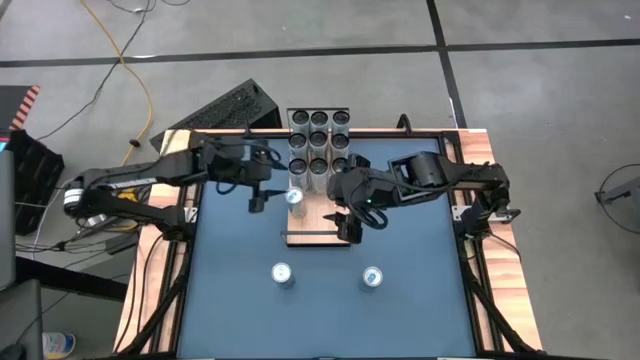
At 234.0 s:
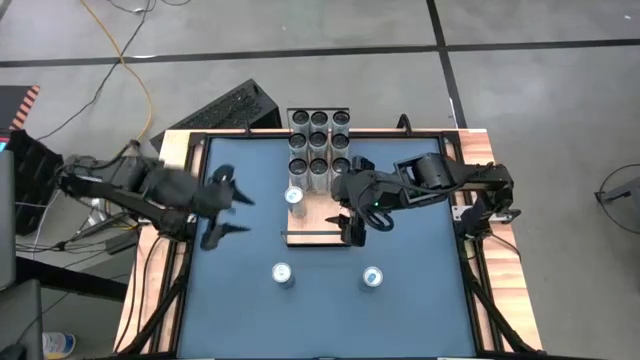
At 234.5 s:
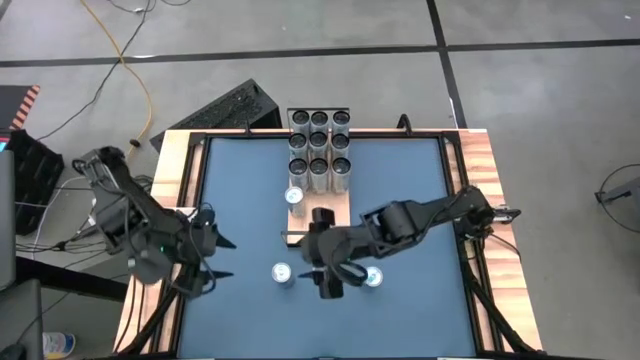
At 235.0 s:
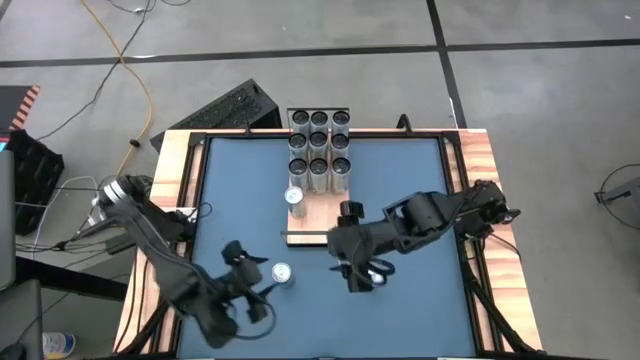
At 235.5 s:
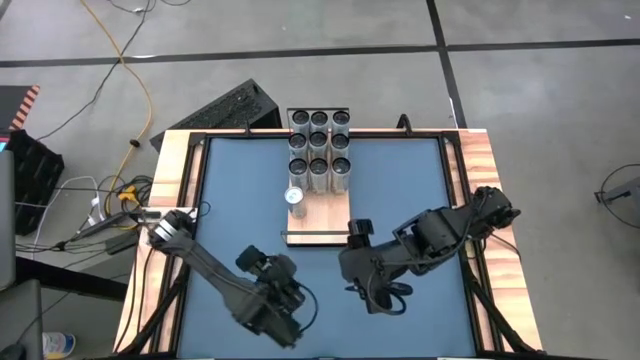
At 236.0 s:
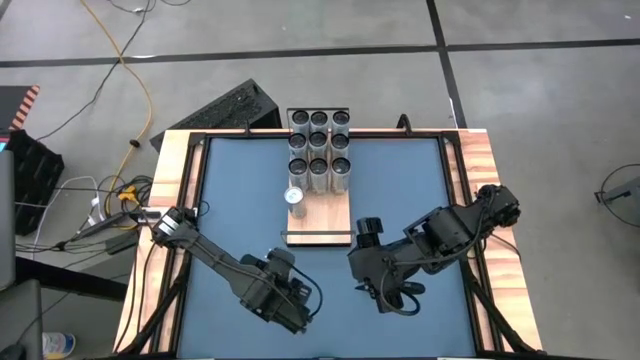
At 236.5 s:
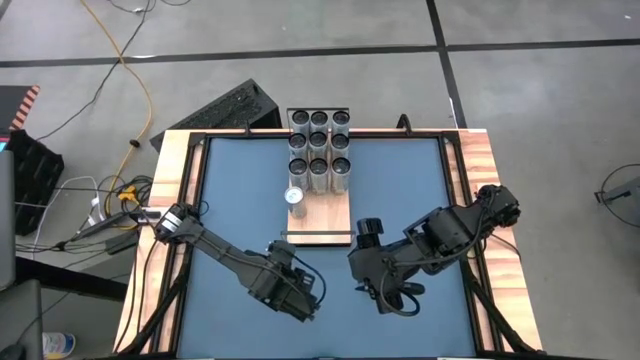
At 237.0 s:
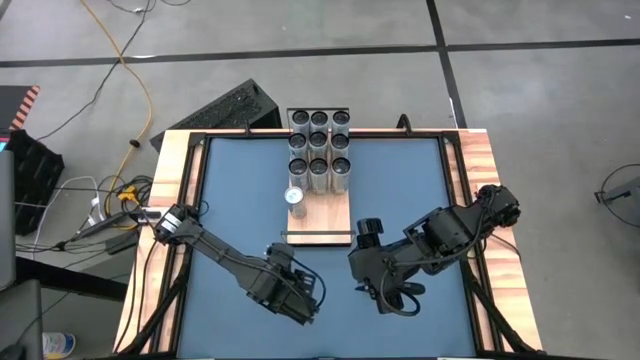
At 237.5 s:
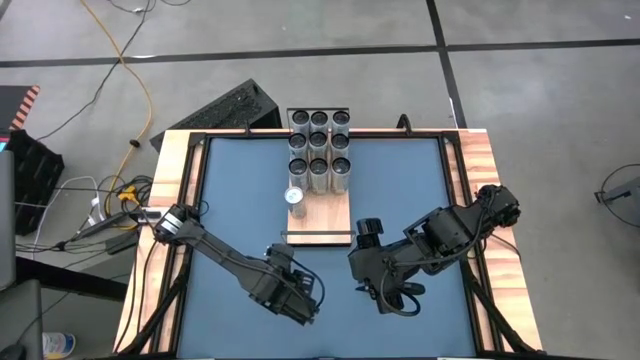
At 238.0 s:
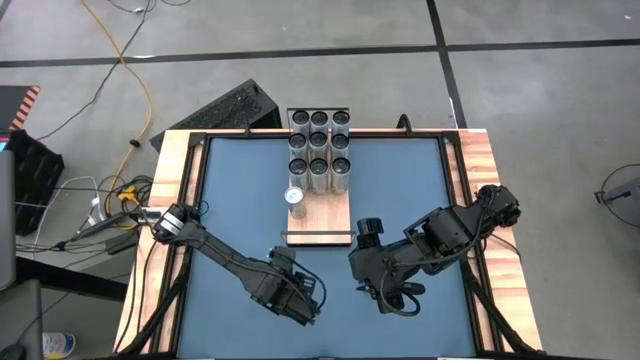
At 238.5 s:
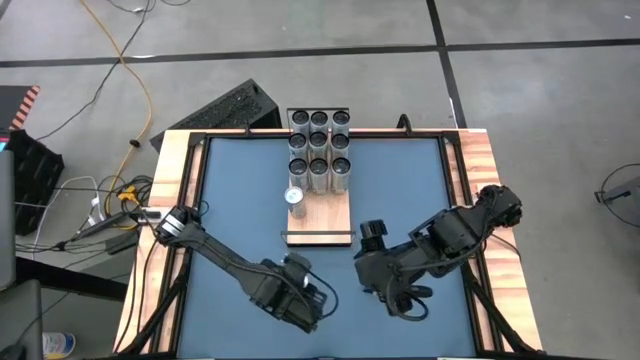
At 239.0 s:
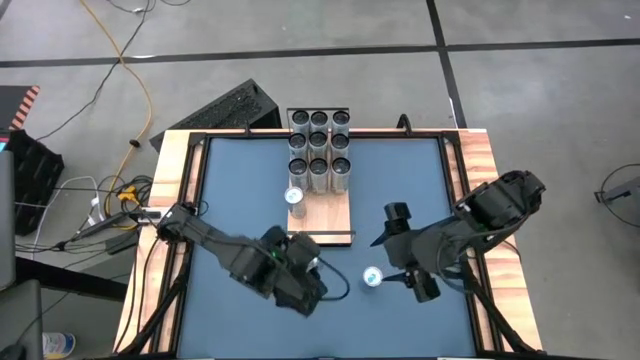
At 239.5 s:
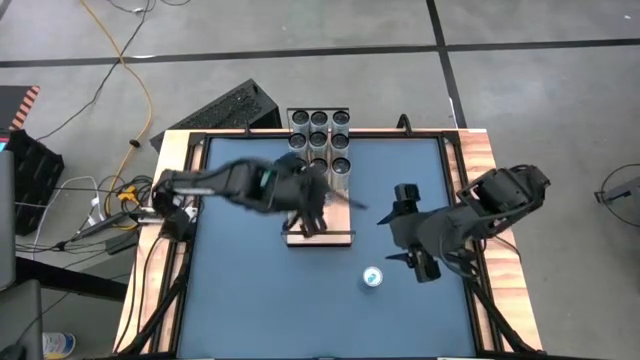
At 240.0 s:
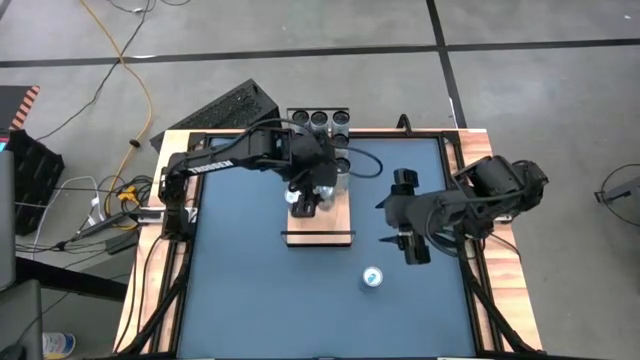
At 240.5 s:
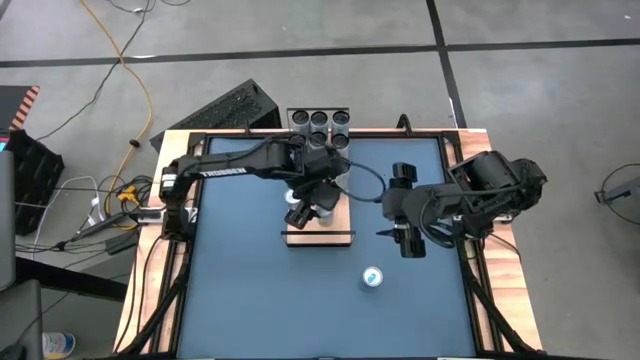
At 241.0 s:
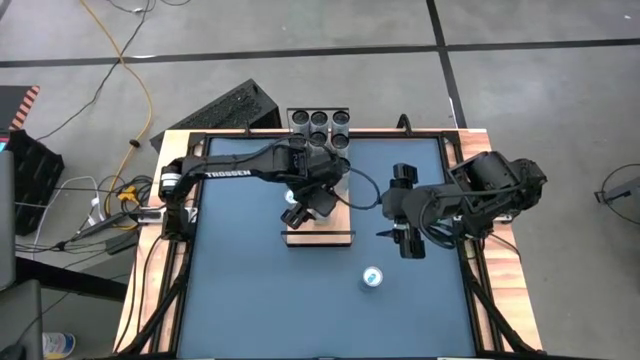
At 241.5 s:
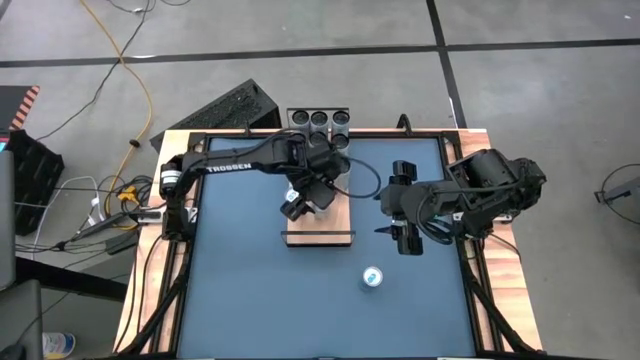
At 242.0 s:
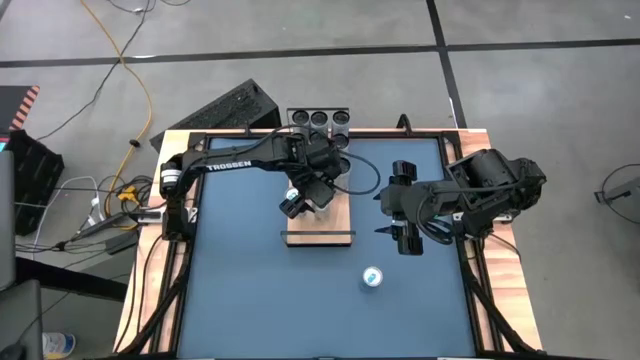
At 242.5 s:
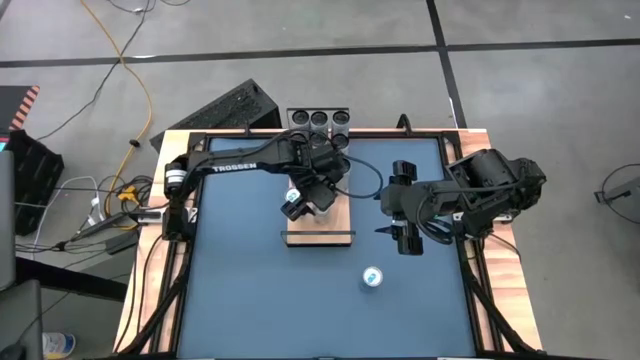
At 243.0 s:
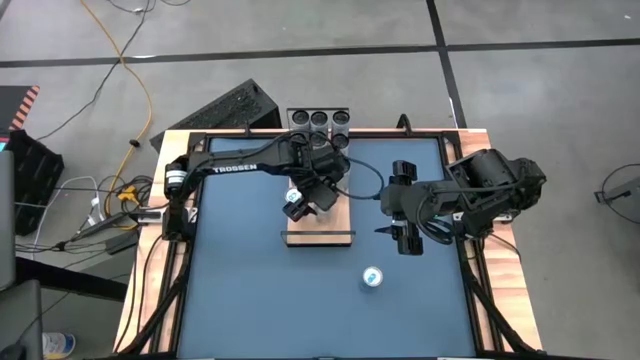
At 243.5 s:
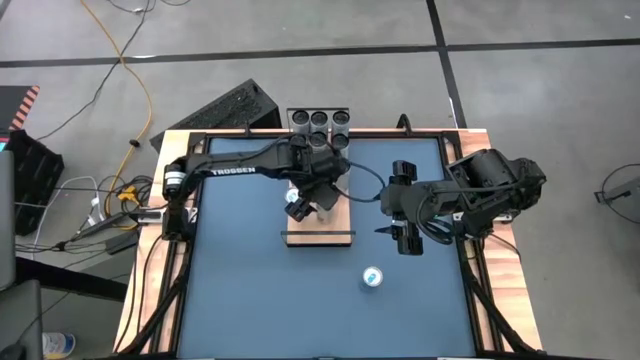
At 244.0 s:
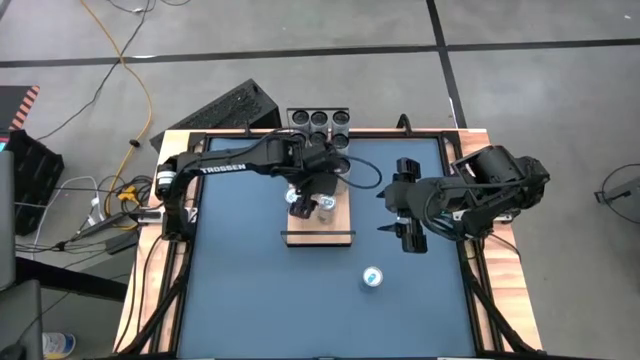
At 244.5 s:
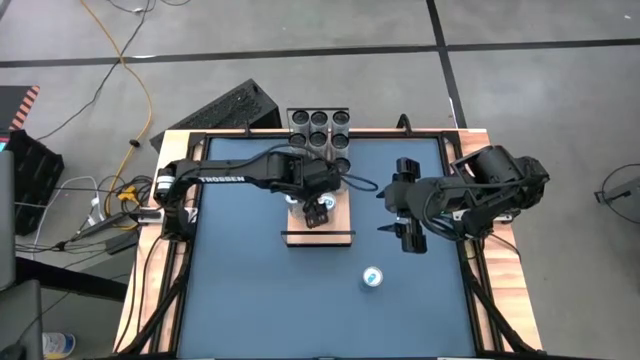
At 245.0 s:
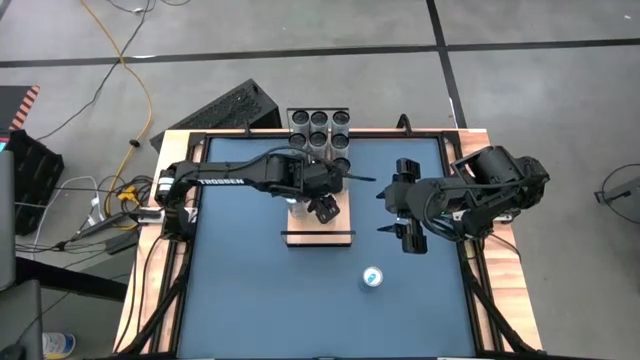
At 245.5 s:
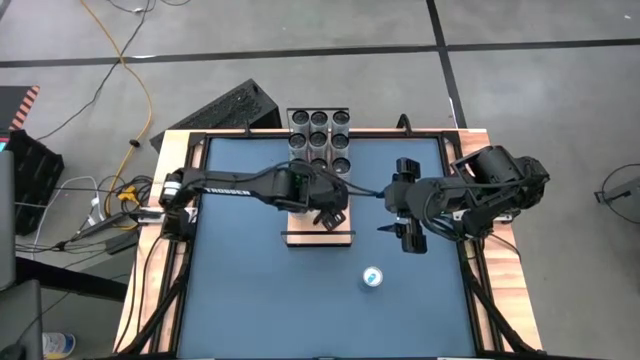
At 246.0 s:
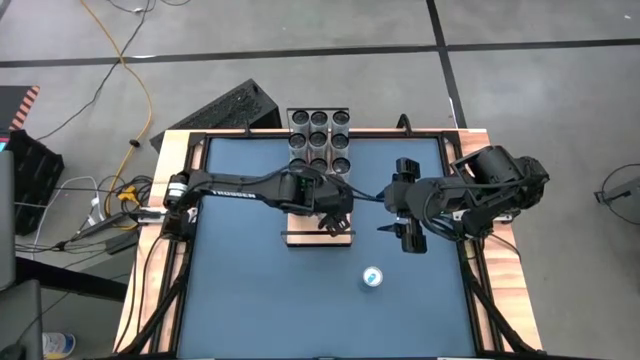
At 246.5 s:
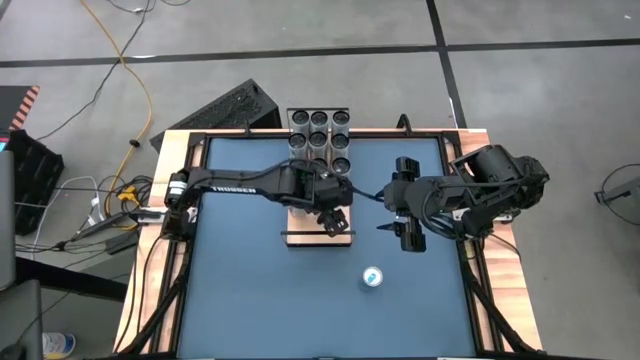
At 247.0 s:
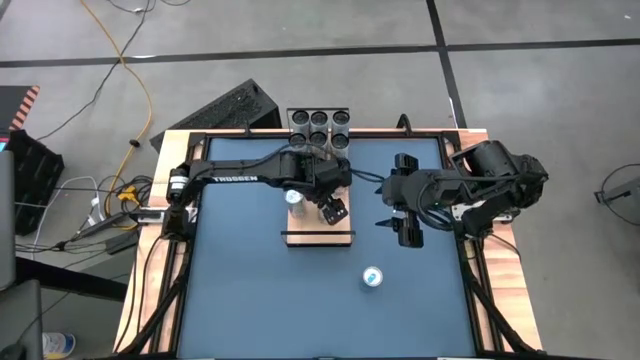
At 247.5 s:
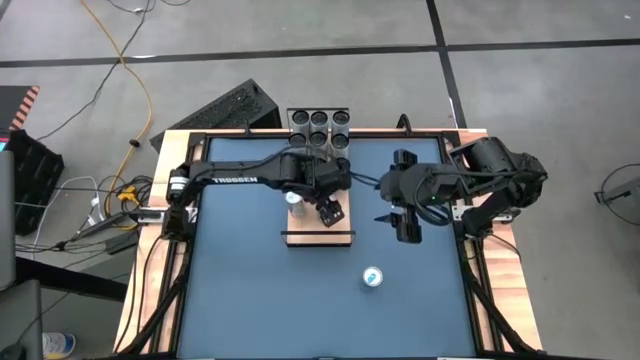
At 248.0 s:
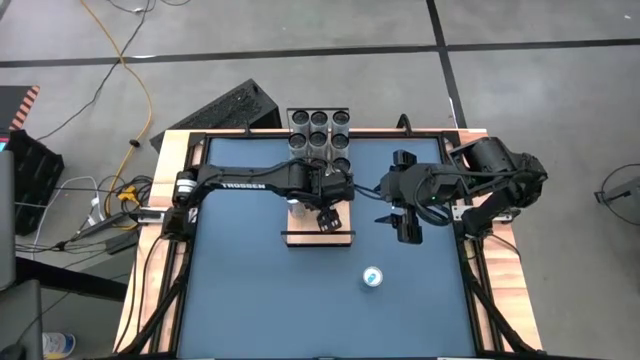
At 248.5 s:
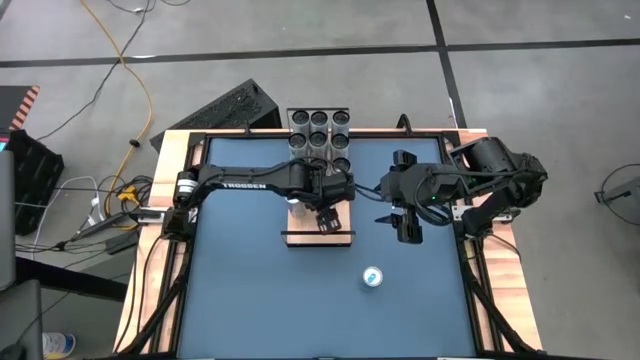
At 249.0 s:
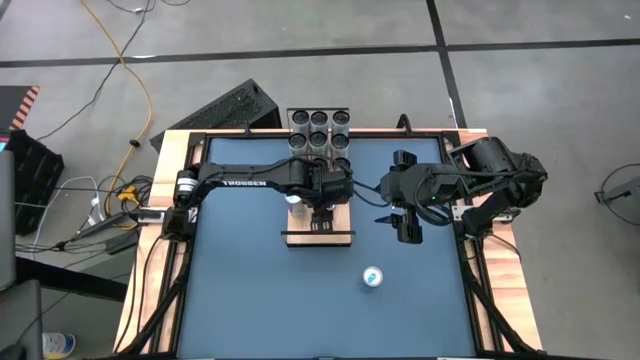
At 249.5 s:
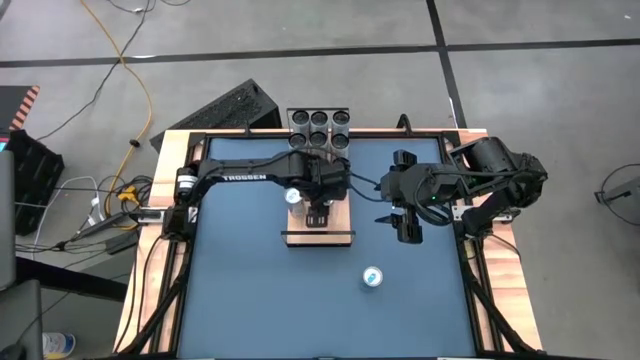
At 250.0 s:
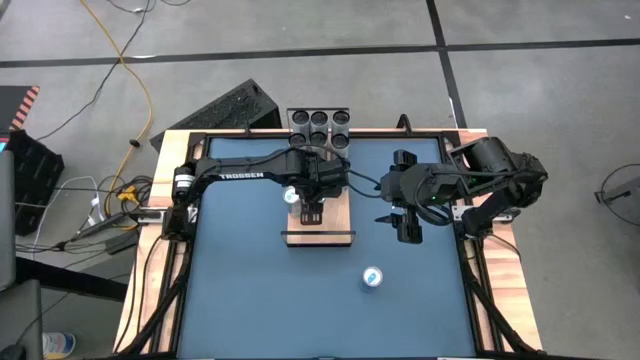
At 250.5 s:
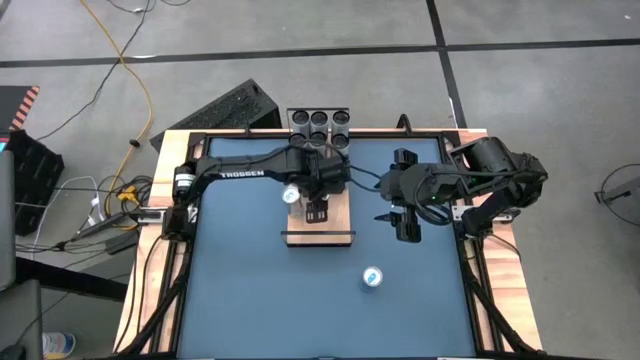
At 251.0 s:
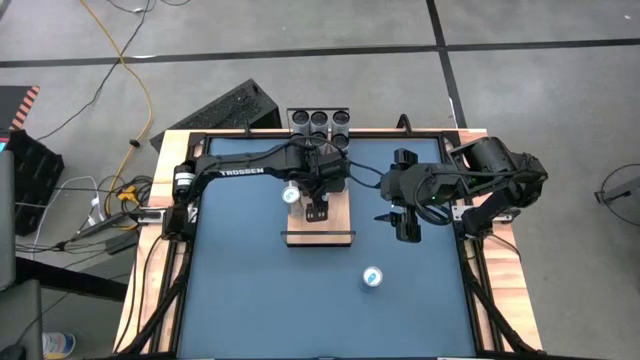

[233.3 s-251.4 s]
Task: Place canned beverage on shelf
Put the left blue soda can on the shelf

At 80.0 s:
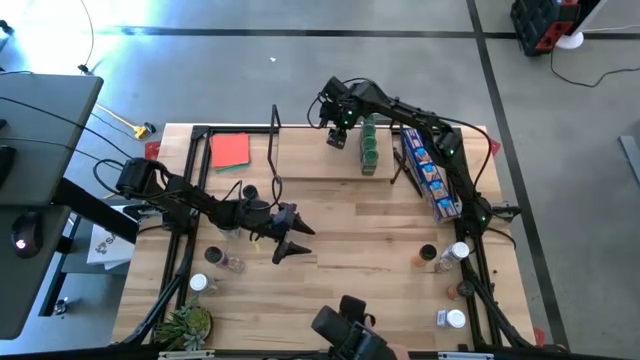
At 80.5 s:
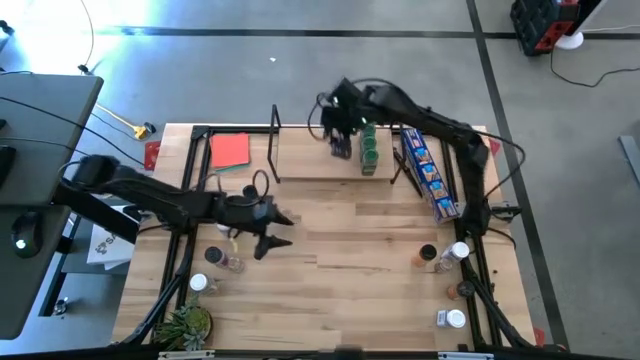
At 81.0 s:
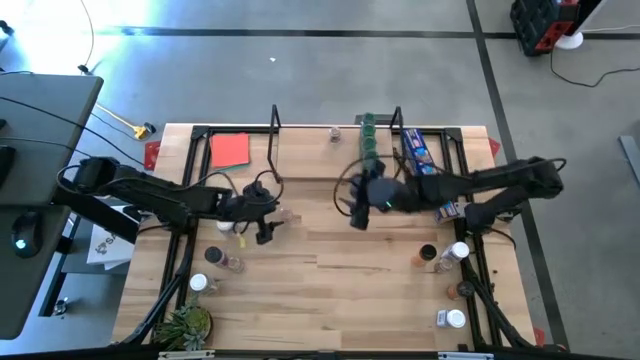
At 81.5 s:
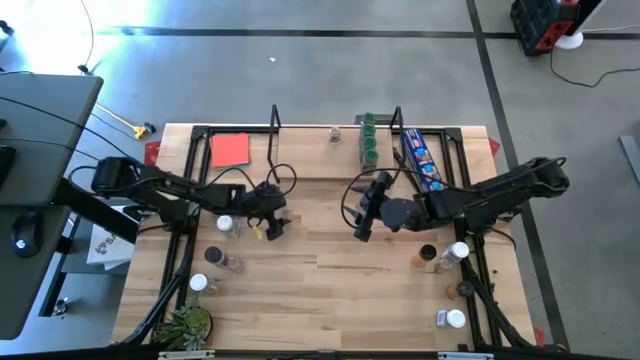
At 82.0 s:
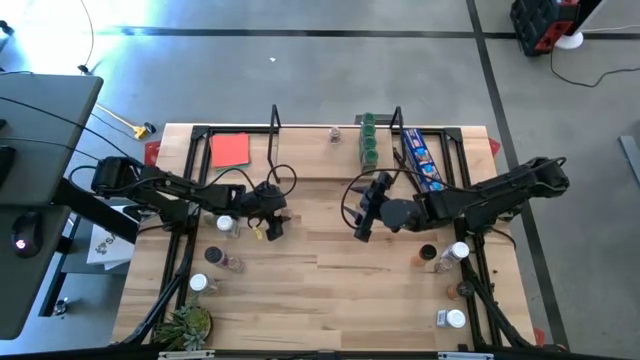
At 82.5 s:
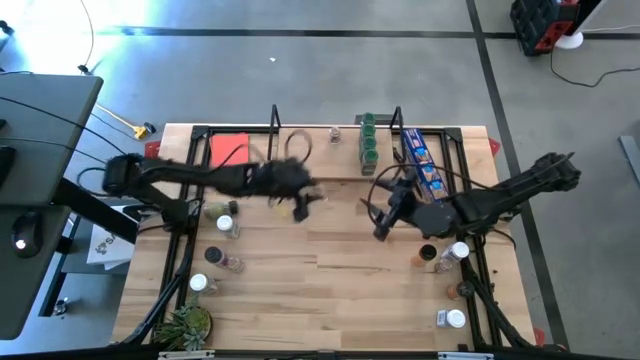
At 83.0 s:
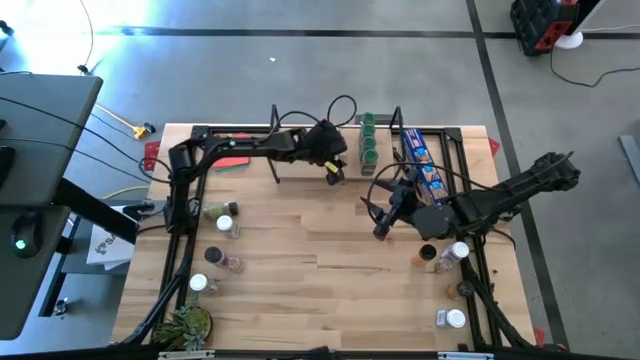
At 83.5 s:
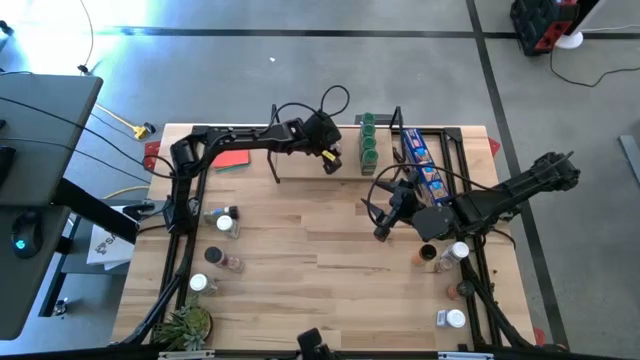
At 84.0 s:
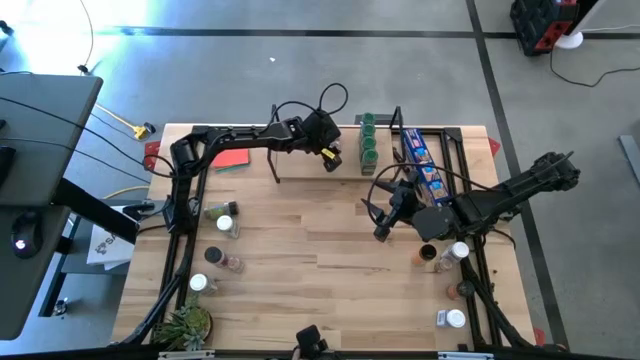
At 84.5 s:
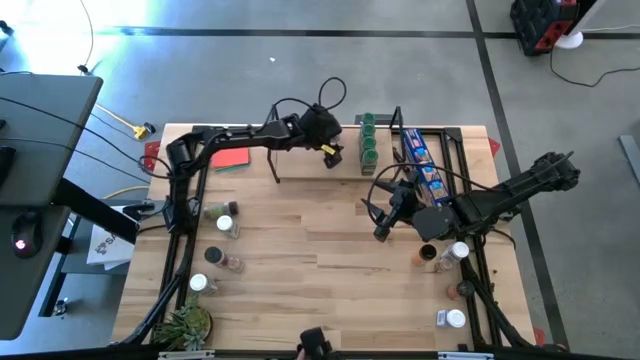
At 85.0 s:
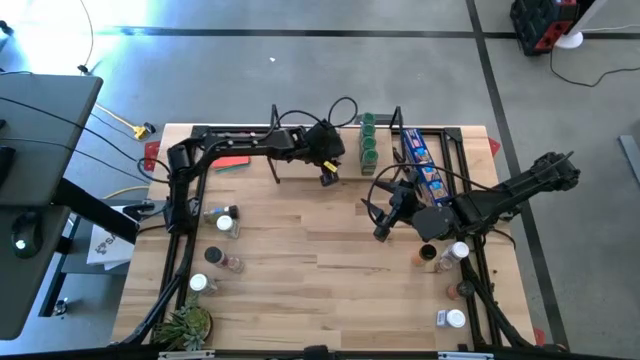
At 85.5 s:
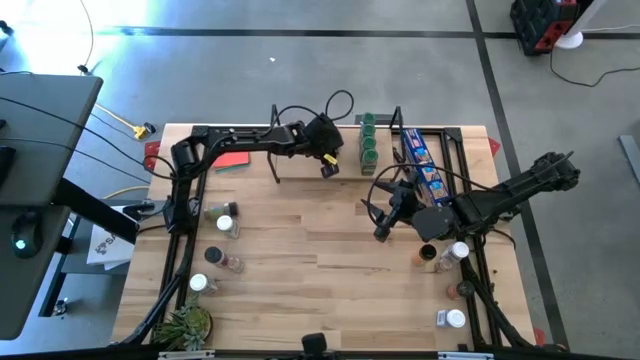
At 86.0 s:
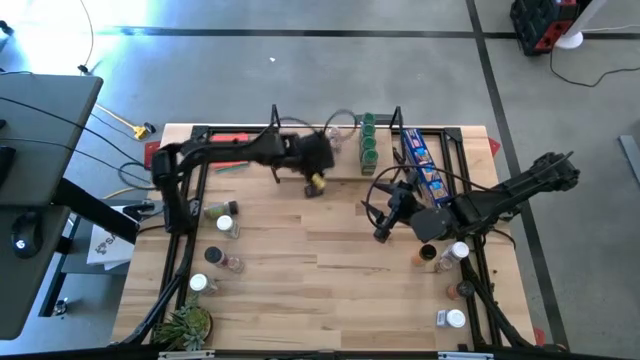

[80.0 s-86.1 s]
Task: Shelf spices
Put the transparent seasoning bottle on the shelf aligned with the other transparent seasoning bottle
